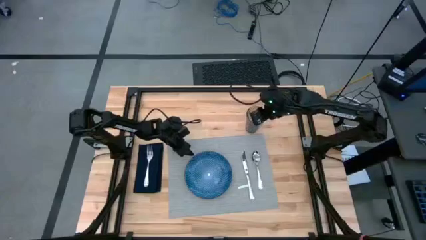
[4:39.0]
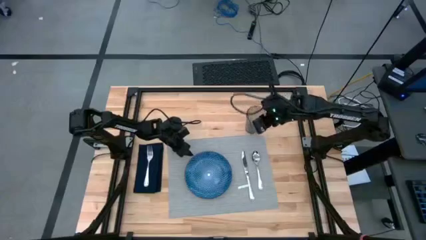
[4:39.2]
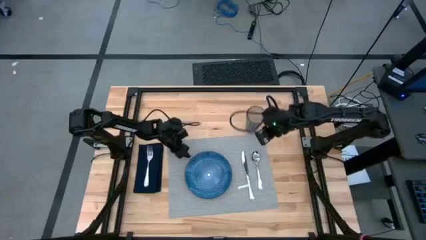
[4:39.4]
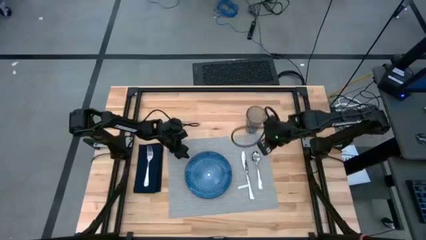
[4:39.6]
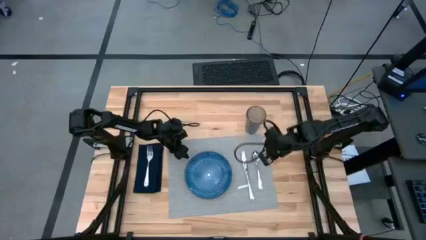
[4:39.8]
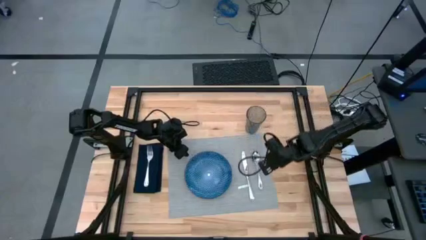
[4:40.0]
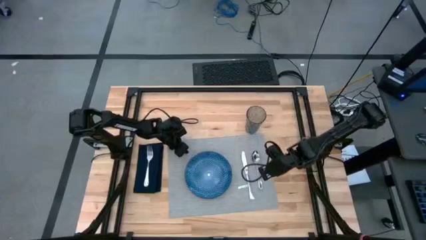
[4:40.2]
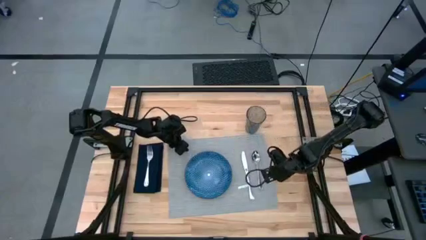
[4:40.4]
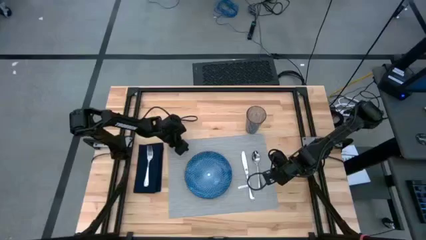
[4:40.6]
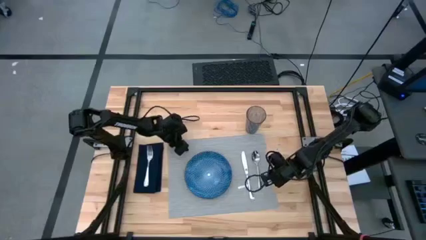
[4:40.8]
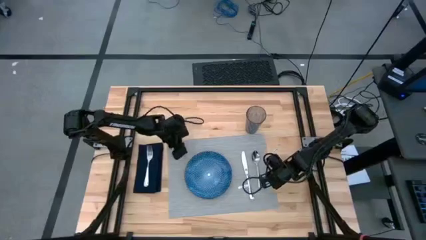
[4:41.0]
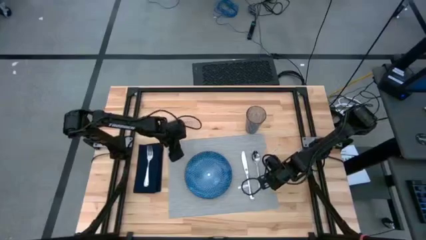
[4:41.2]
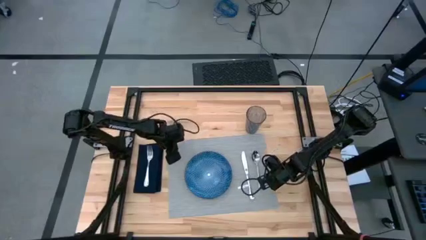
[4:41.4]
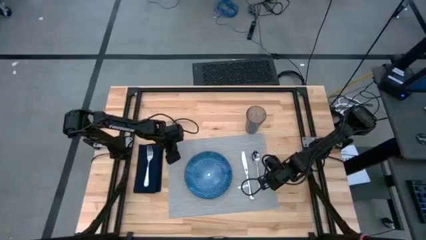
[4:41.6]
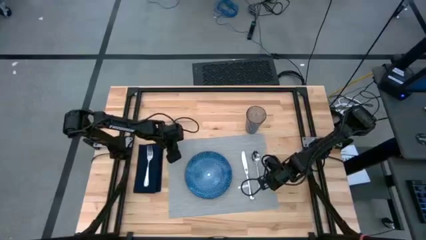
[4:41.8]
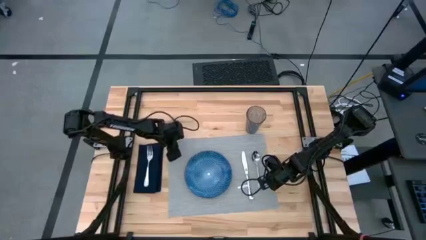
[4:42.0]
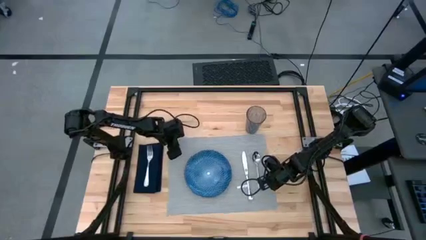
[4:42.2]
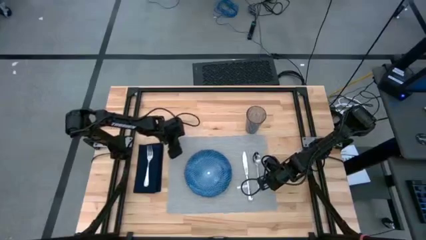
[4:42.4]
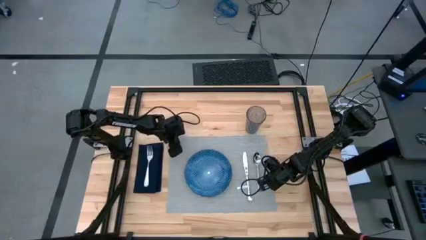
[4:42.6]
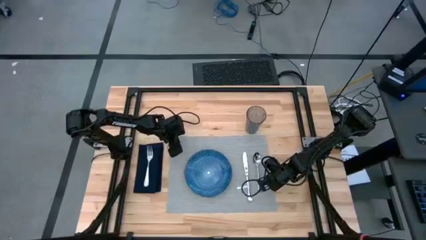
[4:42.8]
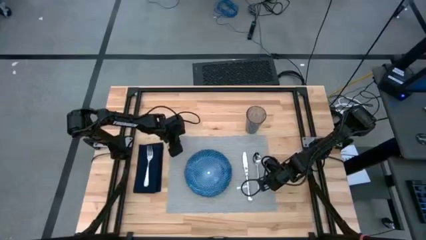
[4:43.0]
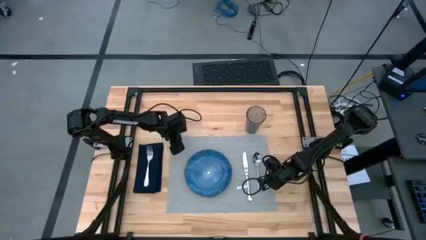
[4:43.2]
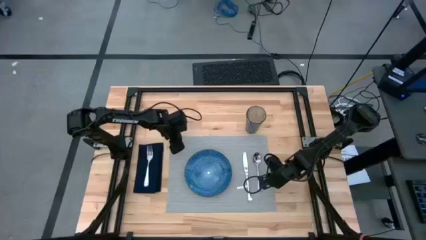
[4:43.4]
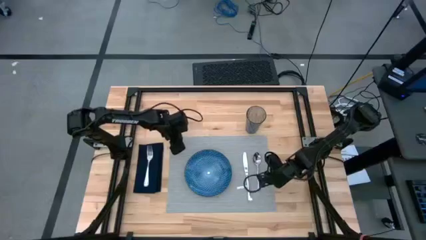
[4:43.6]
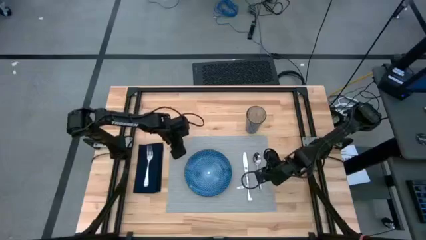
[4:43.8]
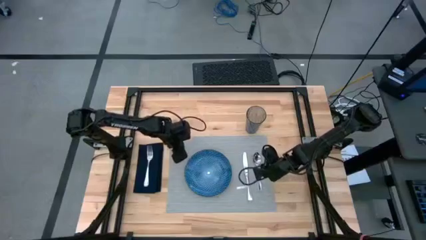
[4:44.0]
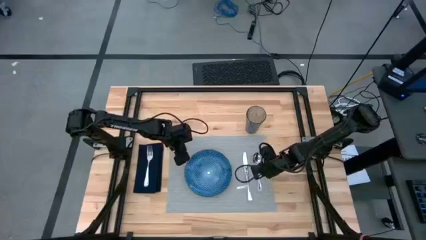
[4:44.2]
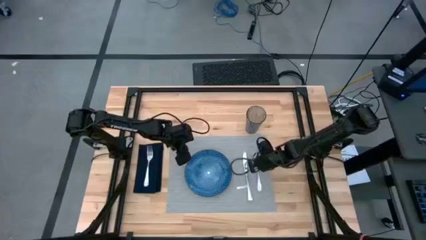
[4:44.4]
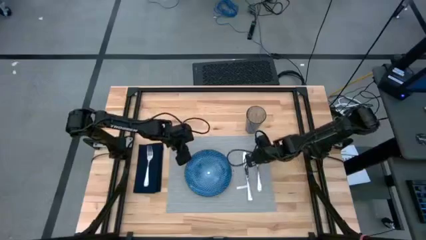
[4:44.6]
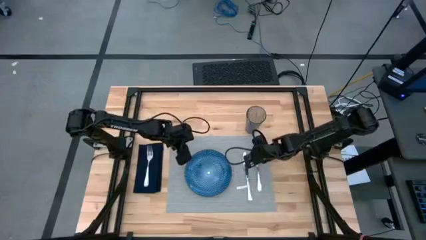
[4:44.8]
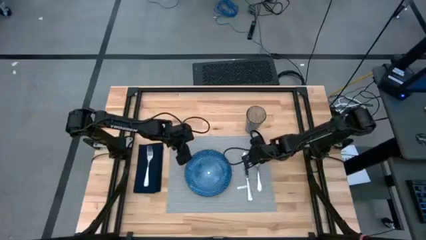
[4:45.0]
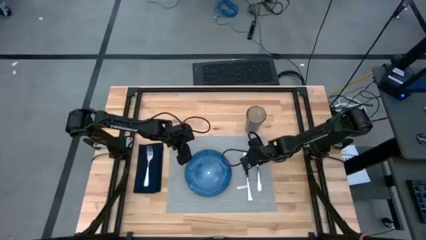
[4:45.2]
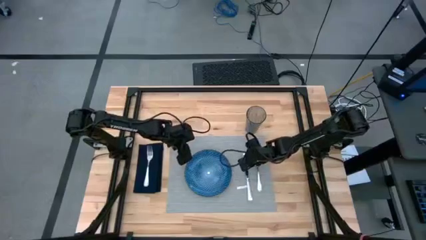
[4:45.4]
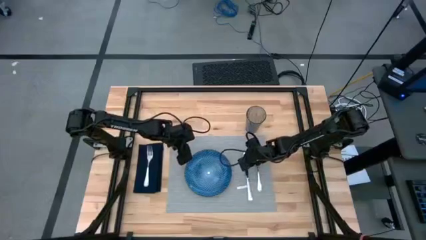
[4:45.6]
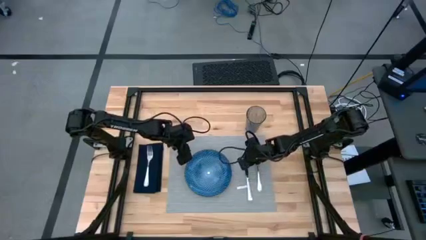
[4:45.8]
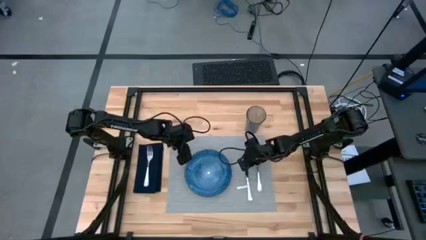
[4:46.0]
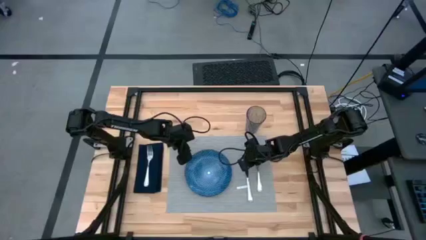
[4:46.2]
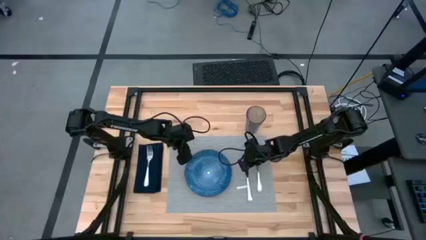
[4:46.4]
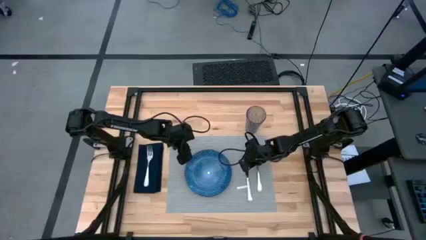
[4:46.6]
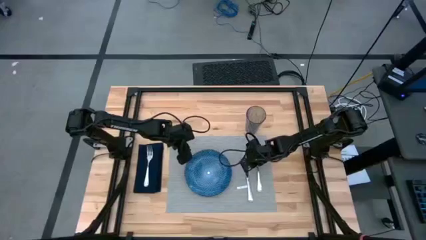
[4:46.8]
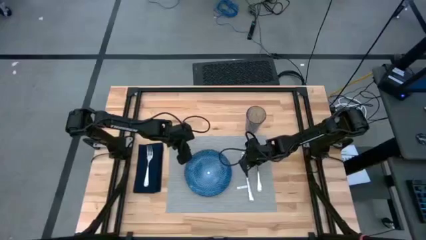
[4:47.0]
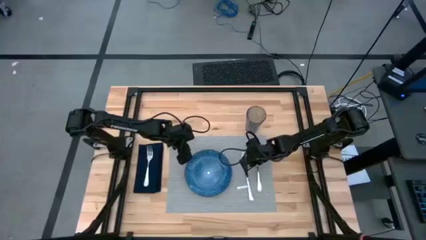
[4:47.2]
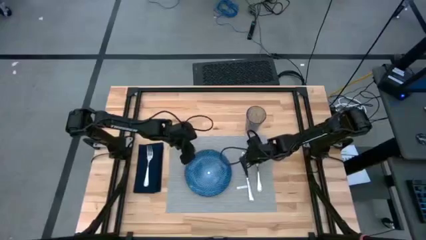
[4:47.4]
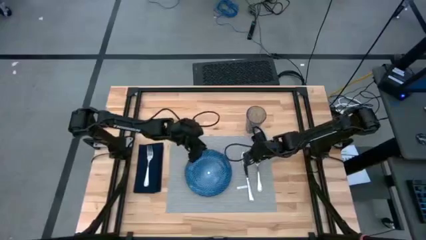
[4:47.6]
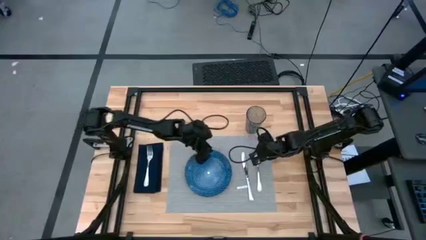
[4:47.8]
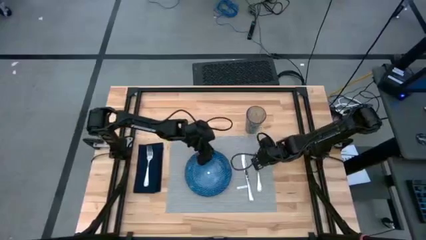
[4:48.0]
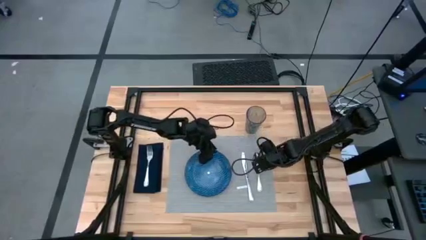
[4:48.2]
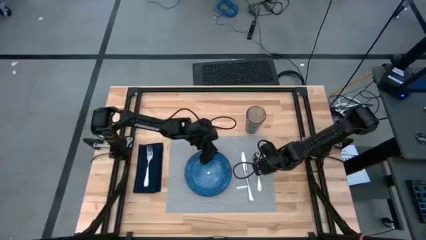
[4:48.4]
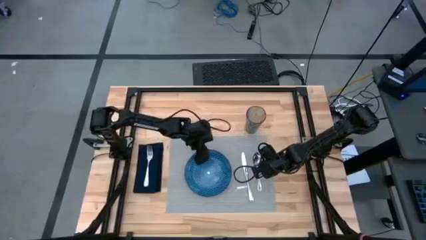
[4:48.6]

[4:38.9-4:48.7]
Task: Set table place
Adjust the gray placemat

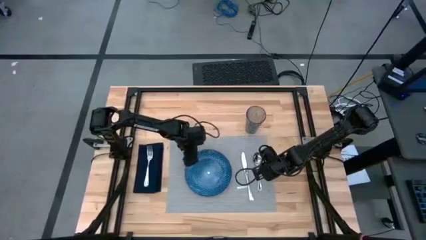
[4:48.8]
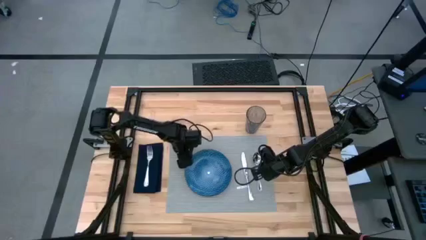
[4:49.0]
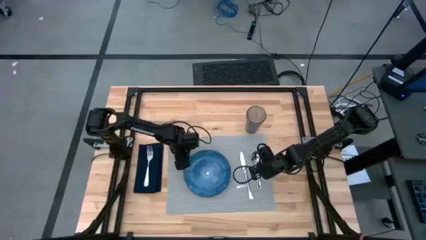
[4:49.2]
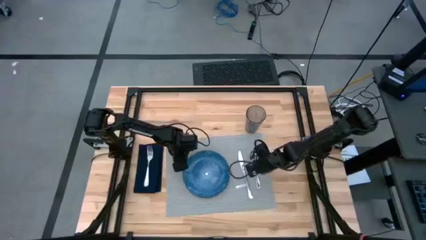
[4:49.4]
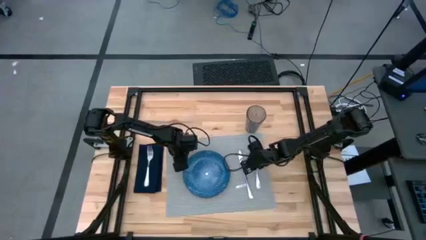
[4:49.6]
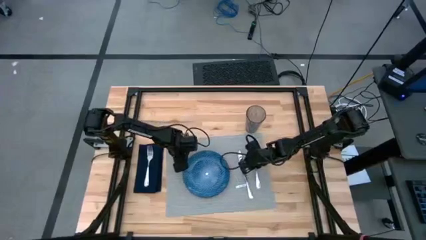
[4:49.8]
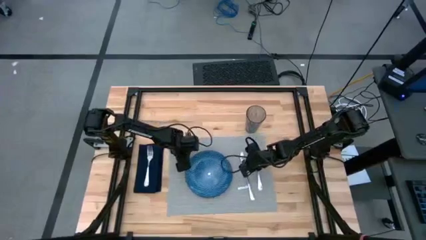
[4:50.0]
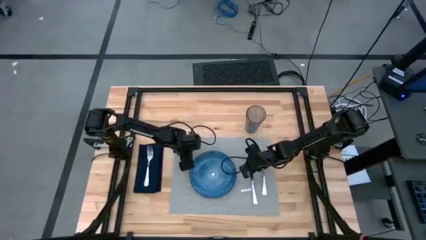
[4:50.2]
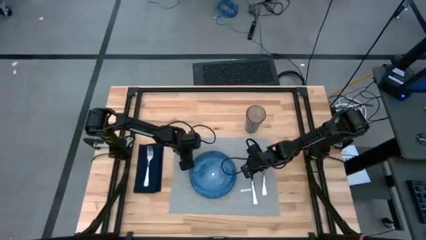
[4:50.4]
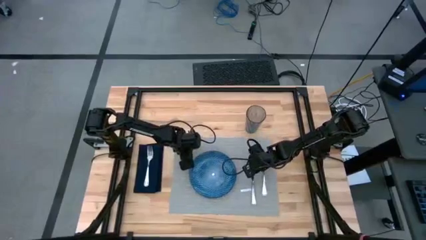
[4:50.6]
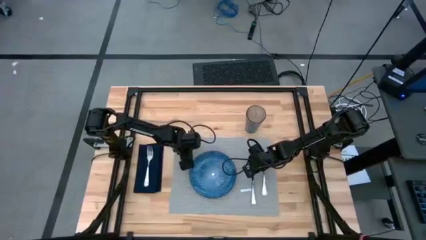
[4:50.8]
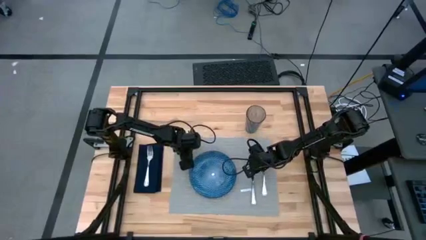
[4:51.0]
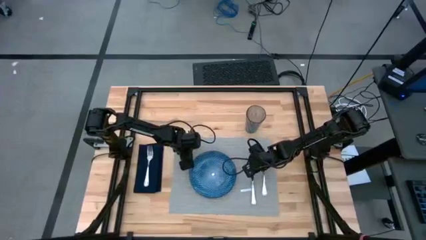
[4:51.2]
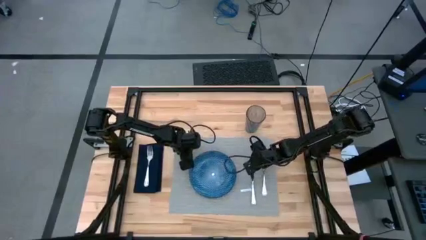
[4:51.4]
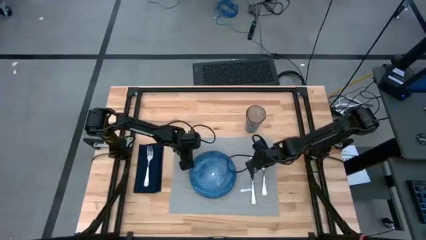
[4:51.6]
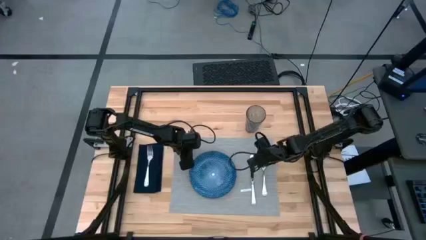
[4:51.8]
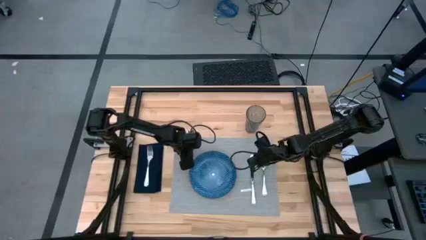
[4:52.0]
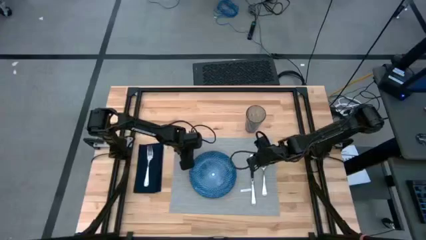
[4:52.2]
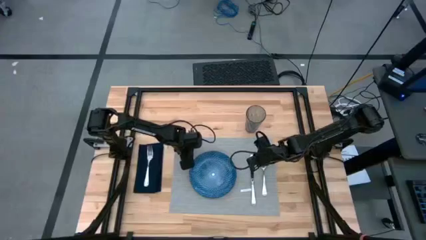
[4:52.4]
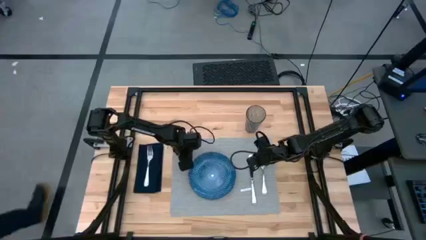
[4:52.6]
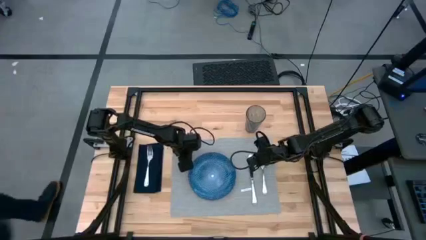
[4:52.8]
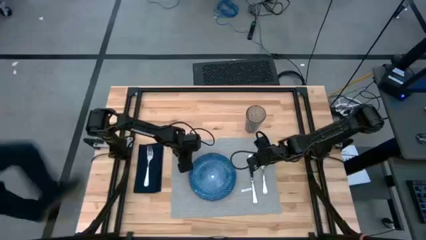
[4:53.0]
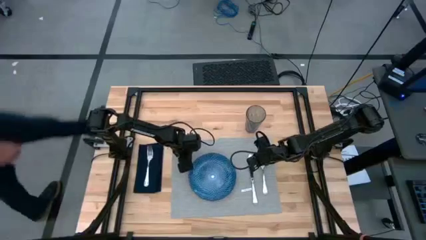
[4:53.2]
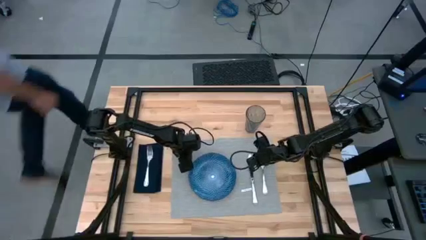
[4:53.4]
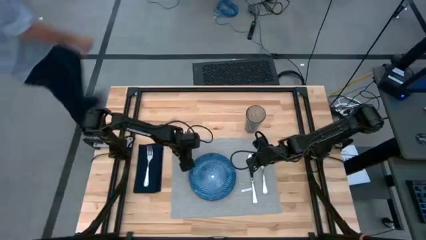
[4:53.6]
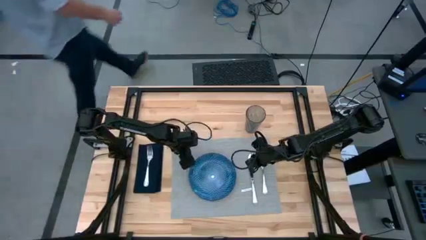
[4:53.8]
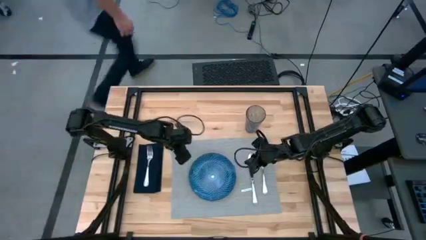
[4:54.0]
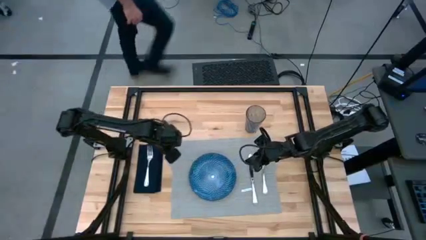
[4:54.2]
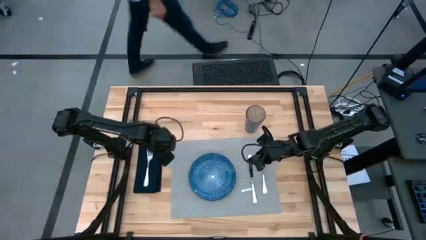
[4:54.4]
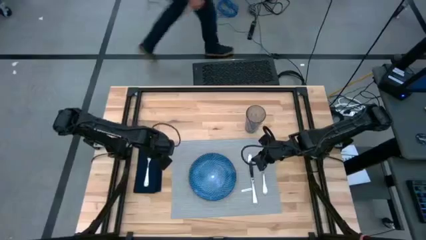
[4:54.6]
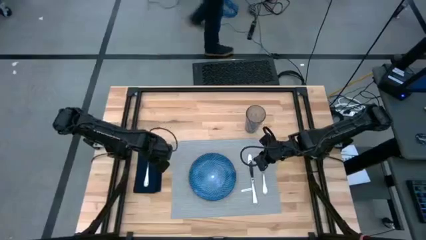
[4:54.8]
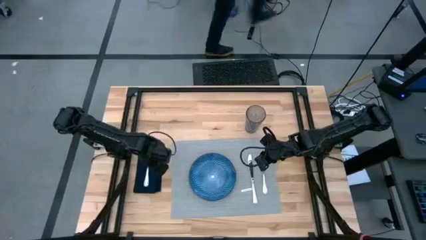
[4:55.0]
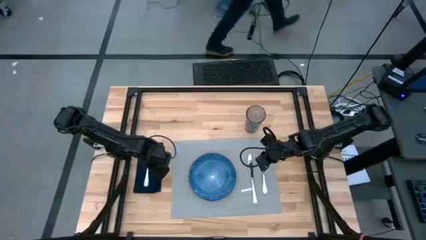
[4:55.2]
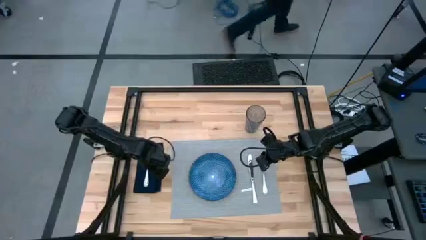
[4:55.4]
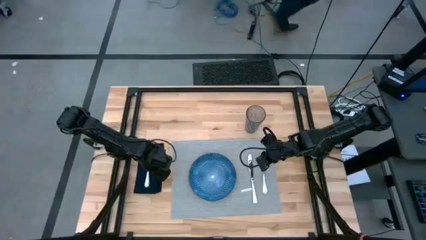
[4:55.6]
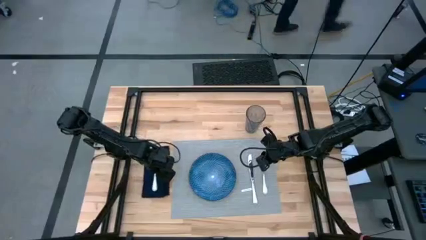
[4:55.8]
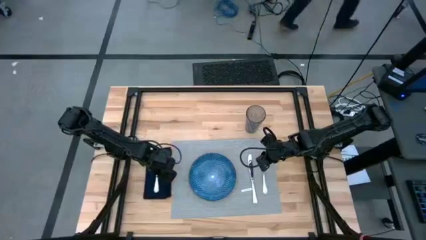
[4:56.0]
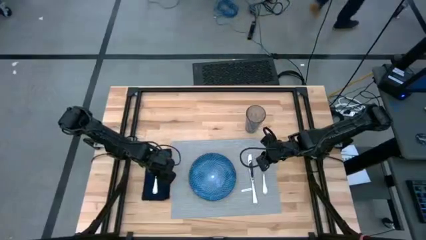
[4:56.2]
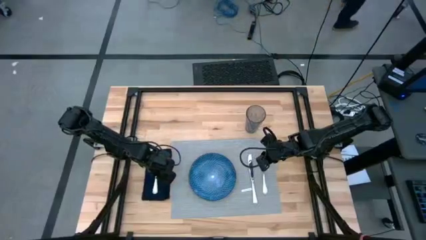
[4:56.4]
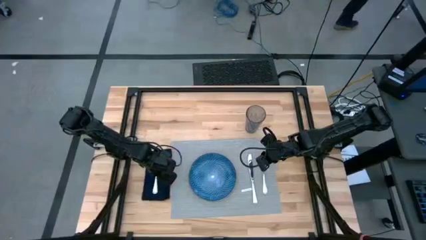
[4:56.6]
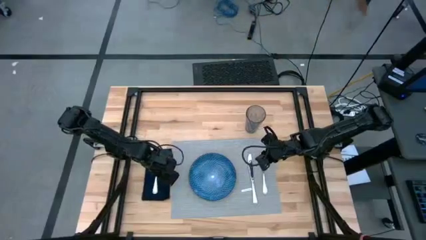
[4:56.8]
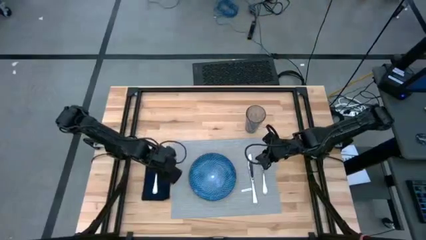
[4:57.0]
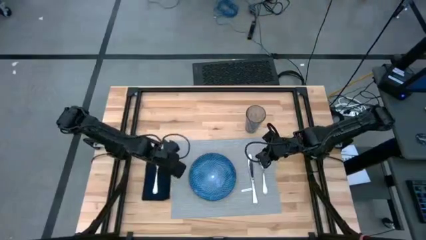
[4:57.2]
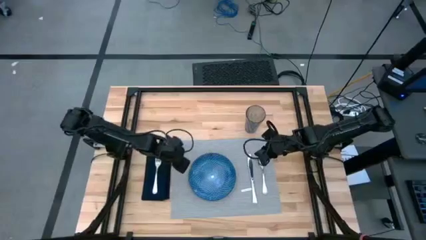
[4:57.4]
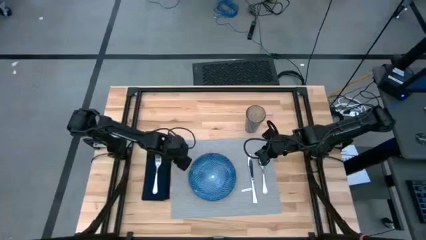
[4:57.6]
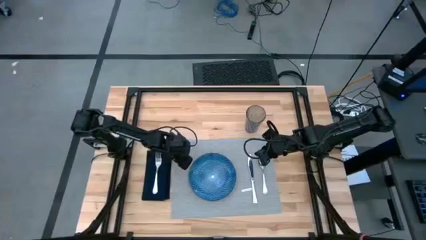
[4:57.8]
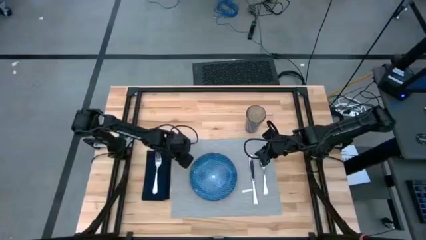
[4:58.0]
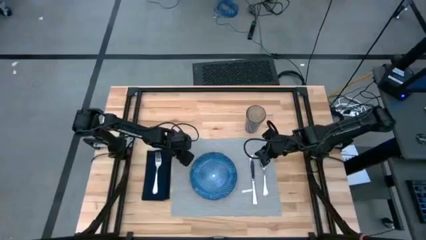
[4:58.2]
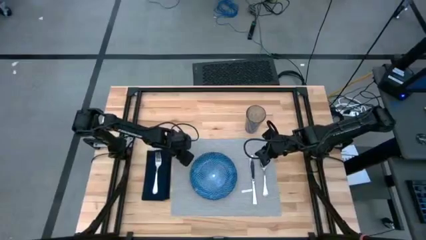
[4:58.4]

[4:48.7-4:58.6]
Adjust the gray placemat
